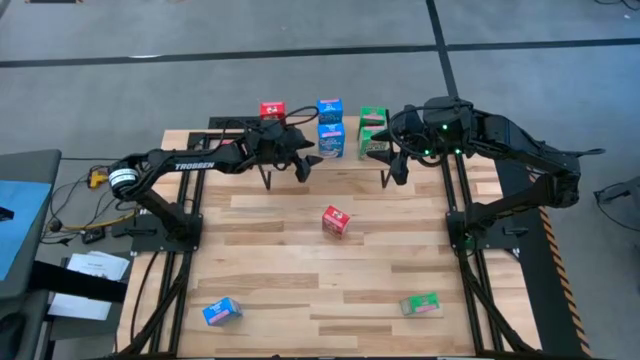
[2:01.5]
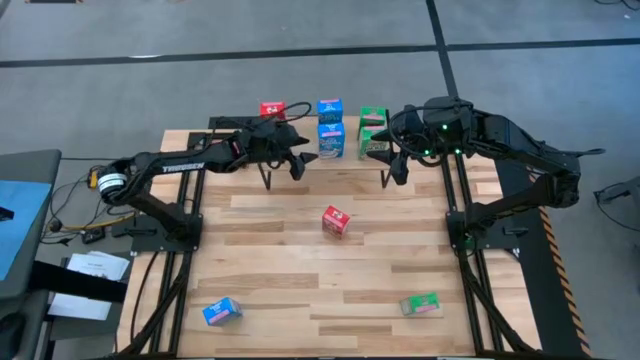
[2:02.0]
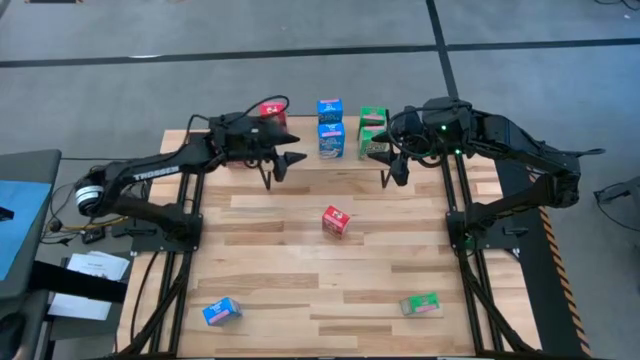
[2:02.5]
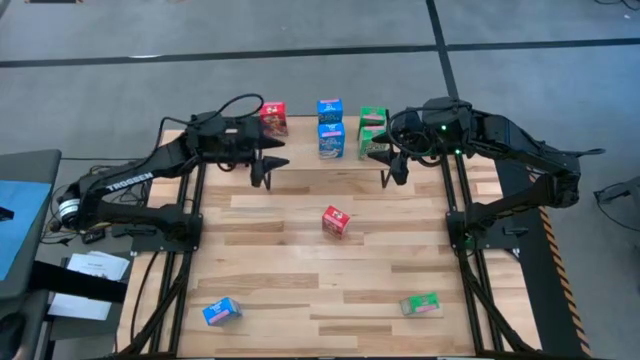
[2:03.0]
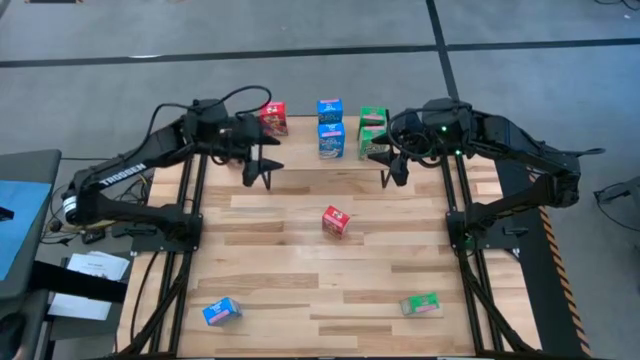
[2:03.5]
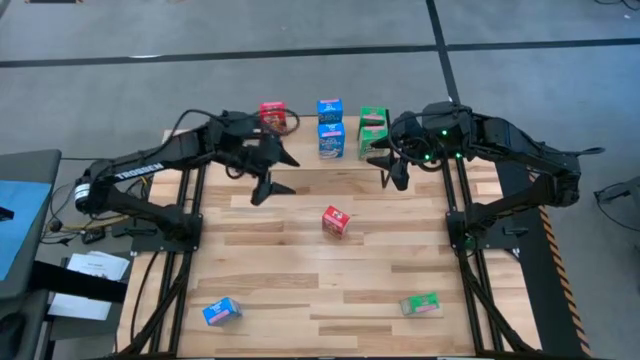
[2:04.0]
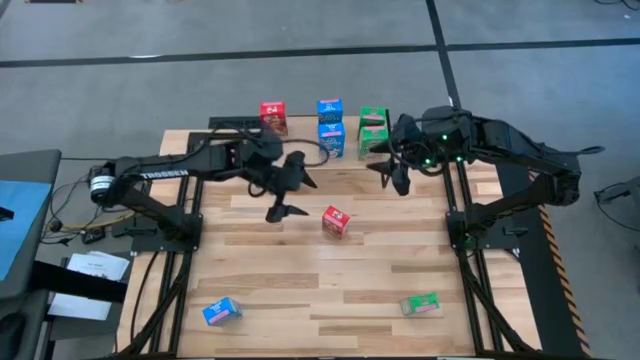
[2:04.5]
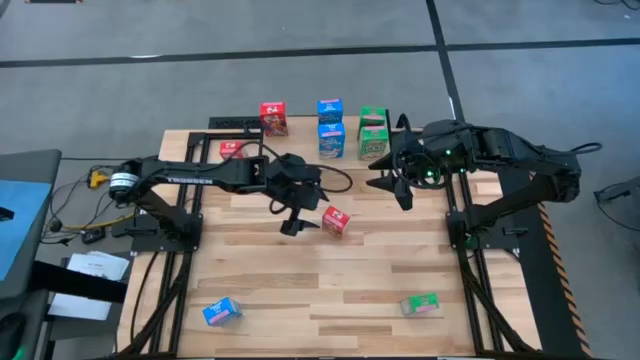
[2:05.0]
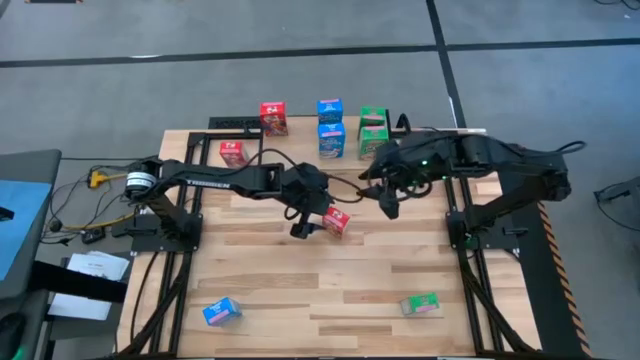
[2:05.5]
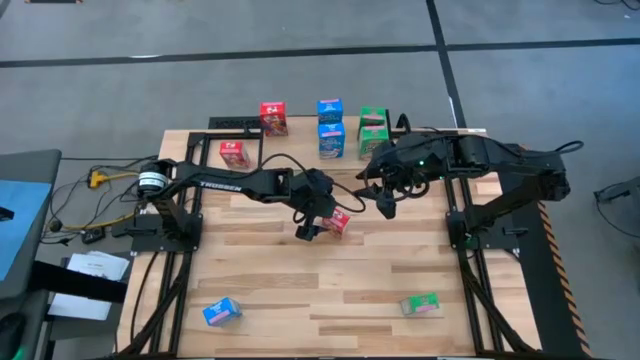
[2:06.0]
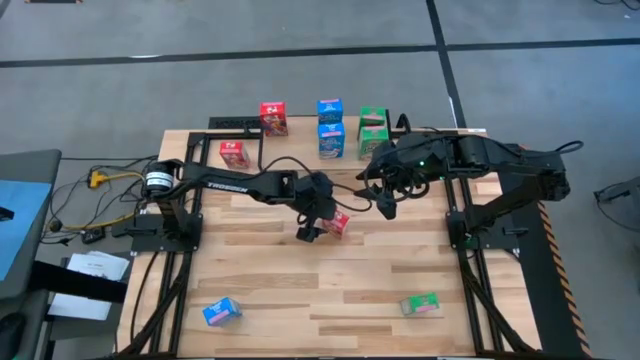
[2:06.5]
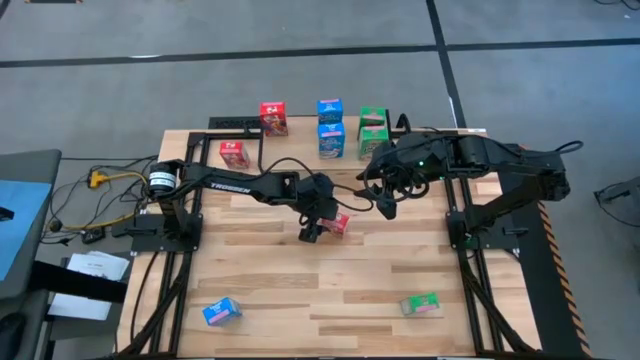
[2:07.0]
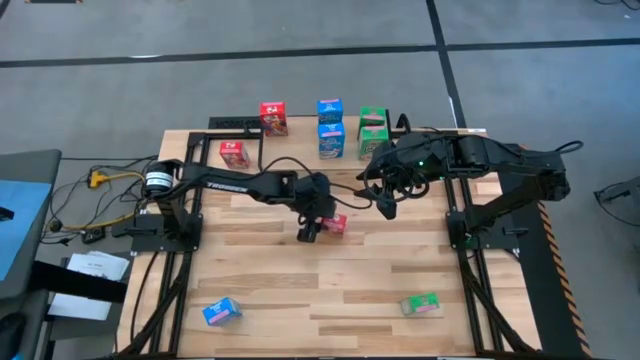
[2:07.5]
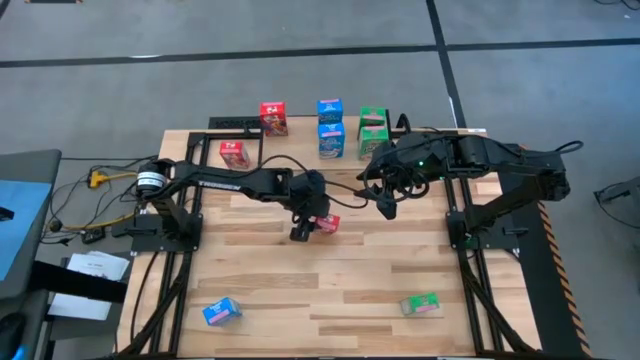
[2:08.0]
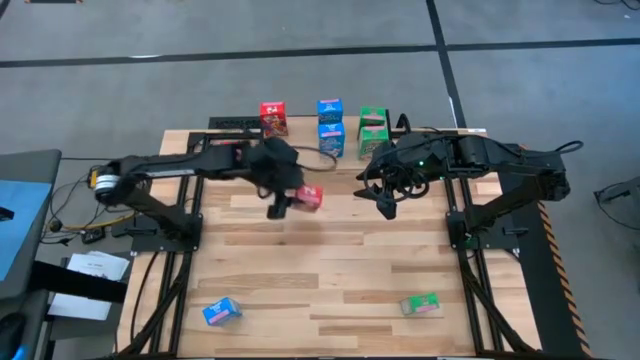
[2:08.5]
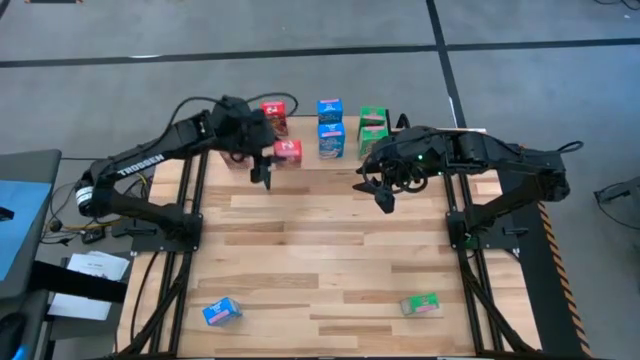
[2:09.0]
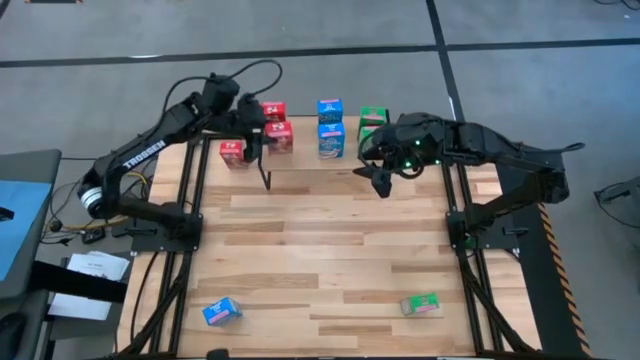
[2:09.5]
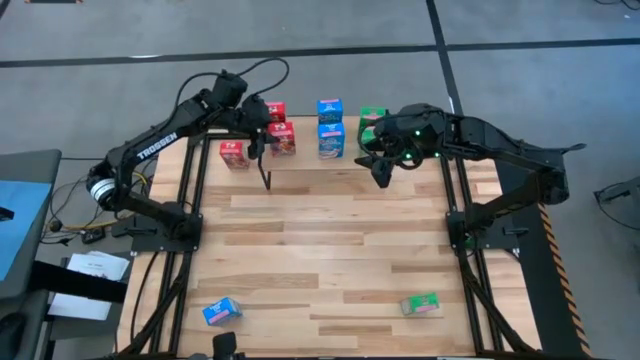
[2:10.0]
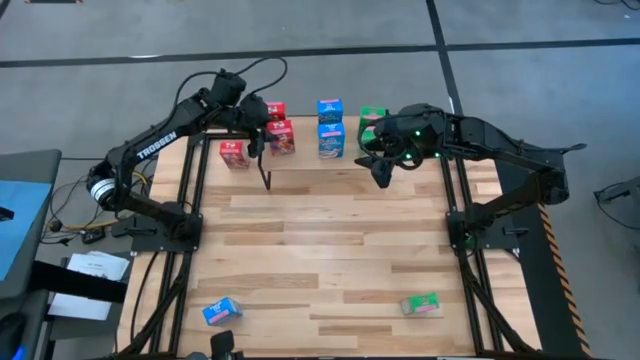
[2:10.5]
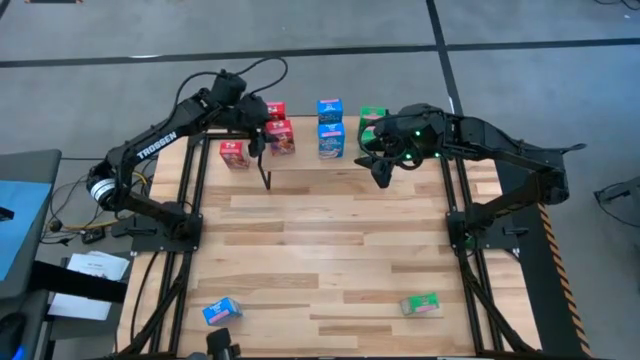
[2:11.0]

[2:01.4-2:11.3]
Task: Stack cereal on shelf
Put the bottom red cereal box on the shelf aligned with the other red cereal box

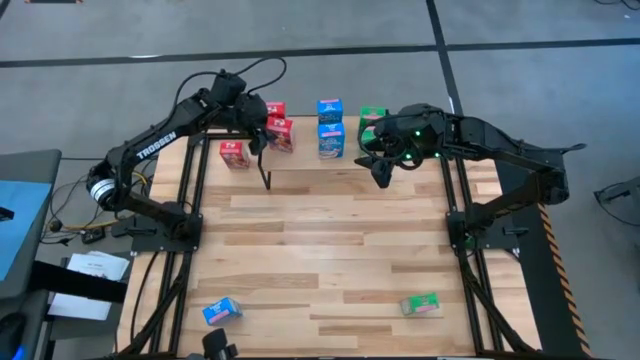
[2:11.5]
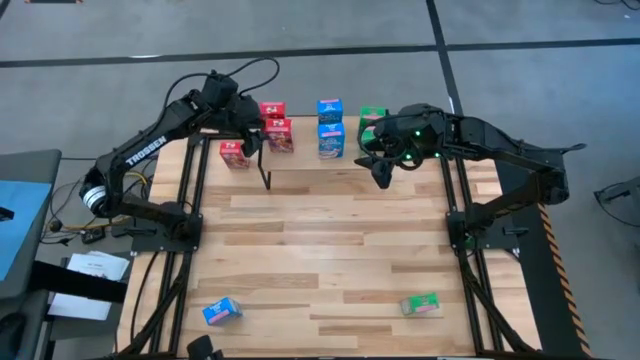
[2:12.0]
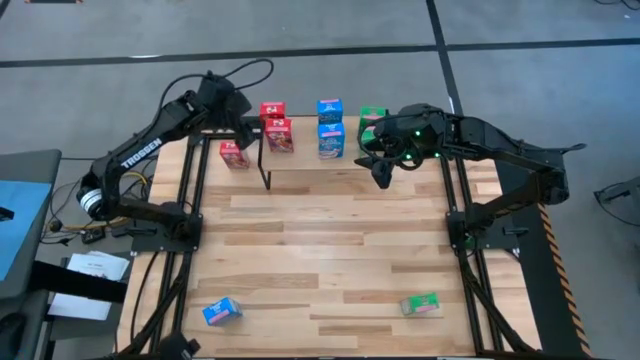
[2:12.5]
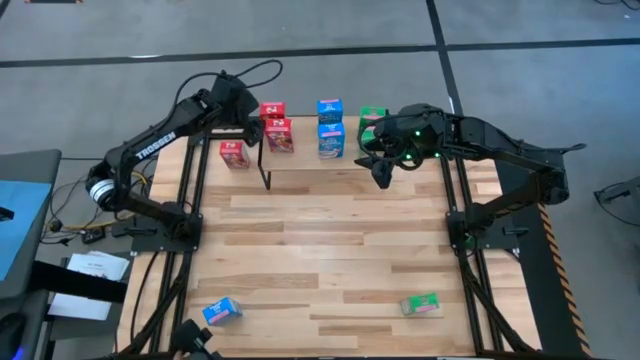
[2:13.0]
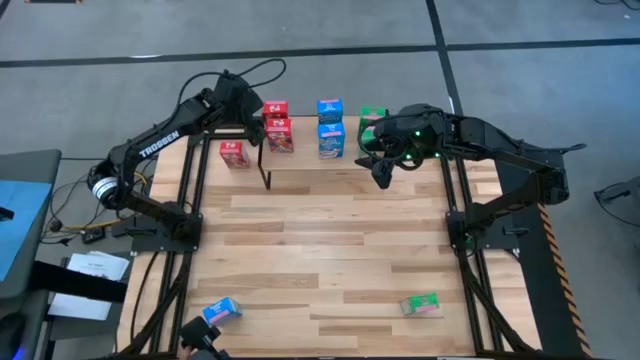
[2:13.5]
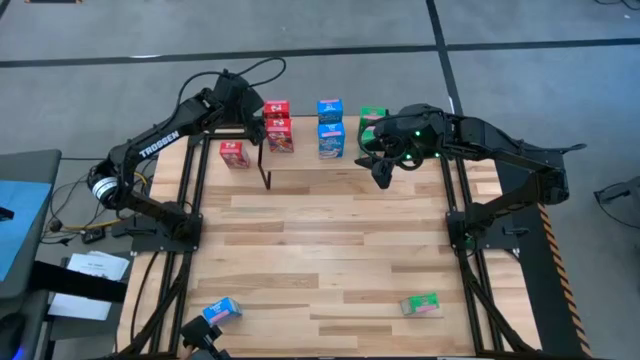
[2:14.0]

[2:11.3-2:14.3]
Adjust the red cereal box on the shelf

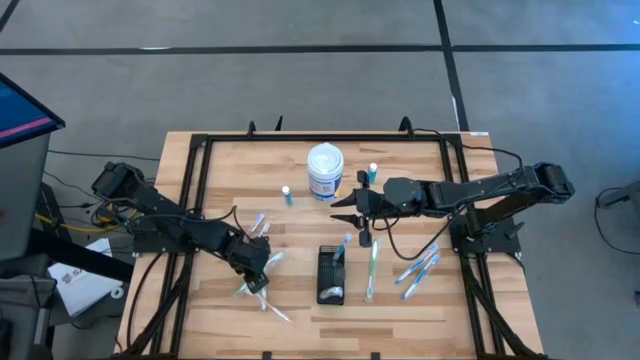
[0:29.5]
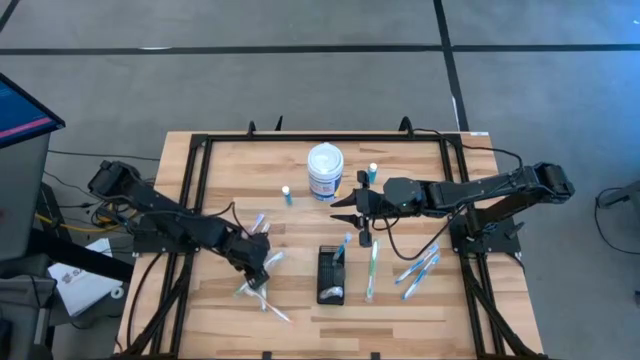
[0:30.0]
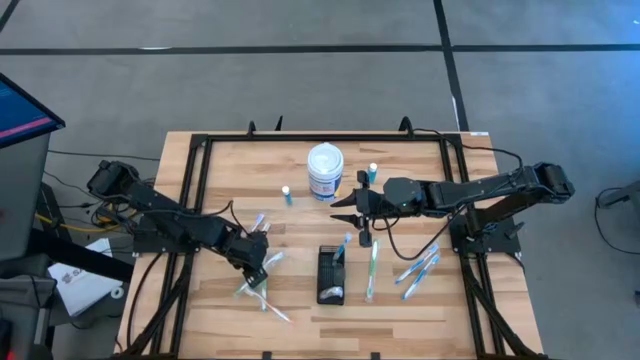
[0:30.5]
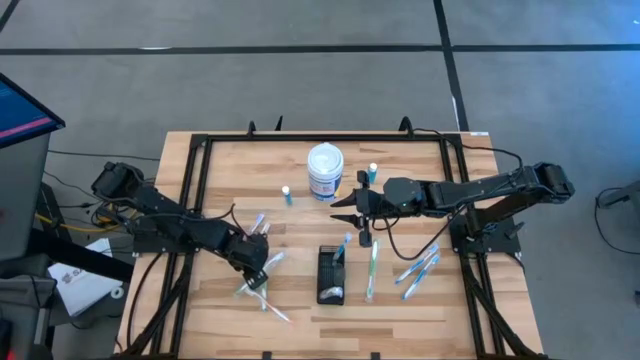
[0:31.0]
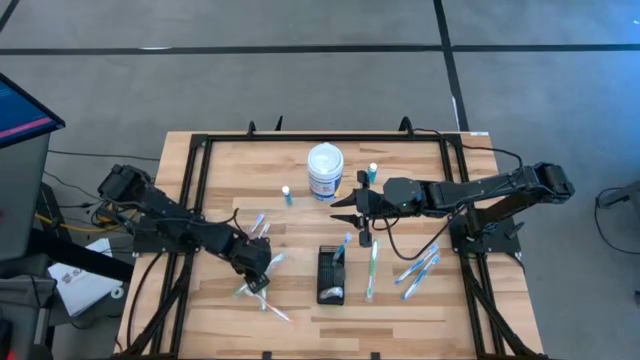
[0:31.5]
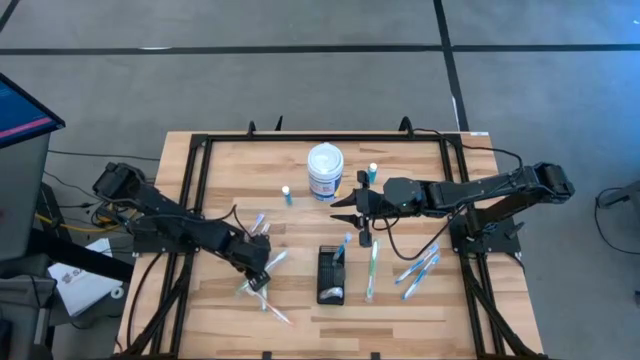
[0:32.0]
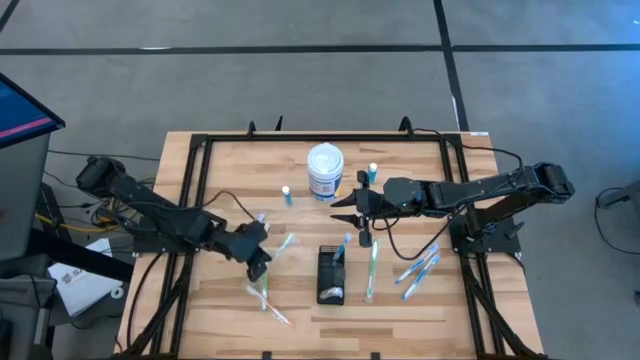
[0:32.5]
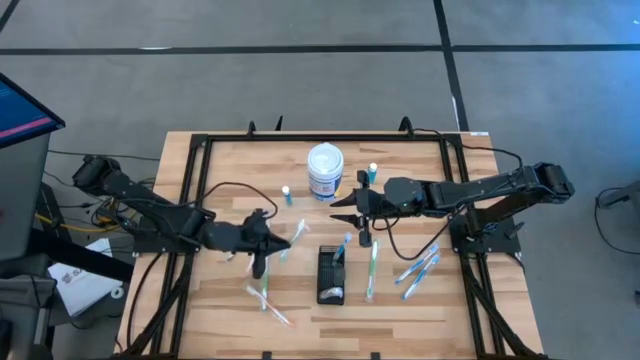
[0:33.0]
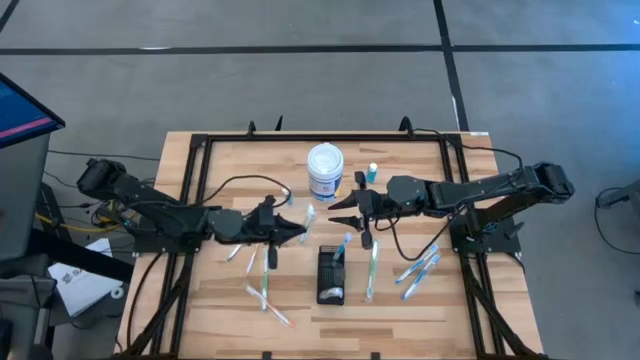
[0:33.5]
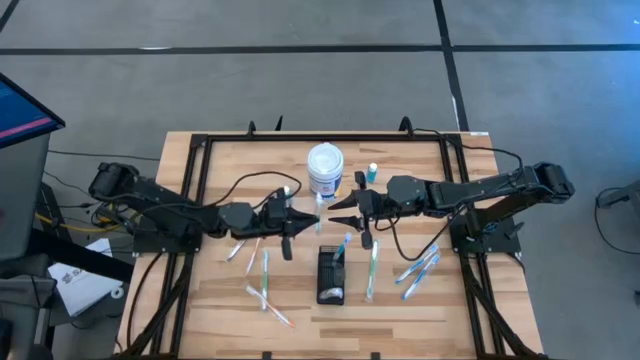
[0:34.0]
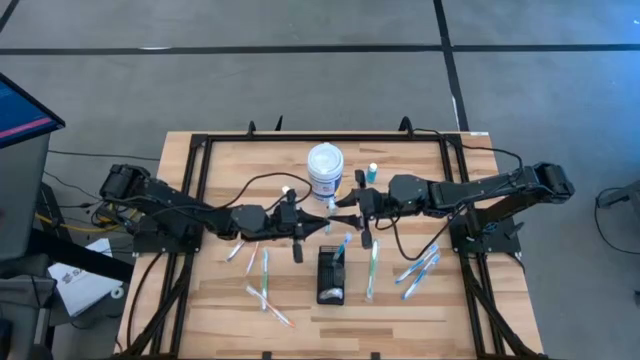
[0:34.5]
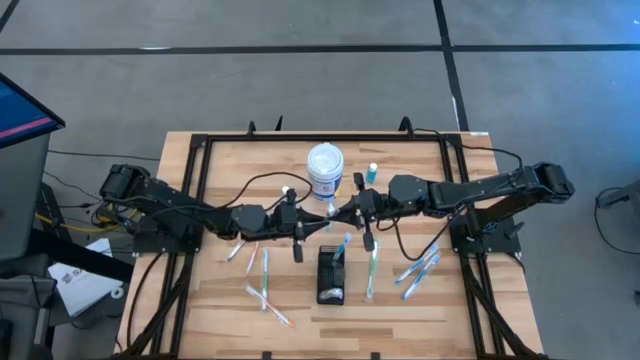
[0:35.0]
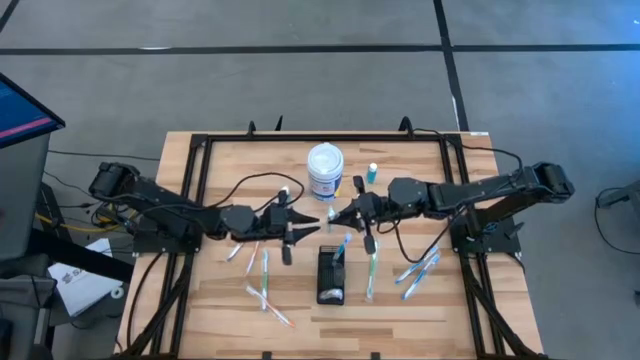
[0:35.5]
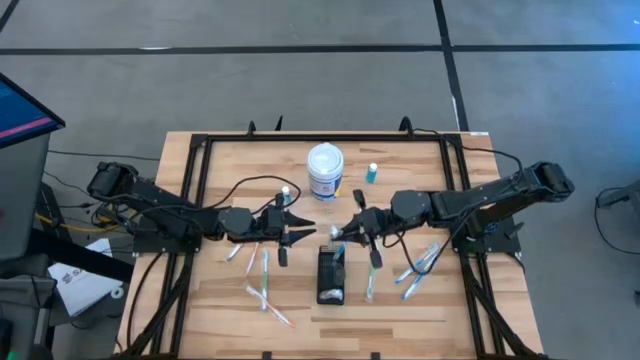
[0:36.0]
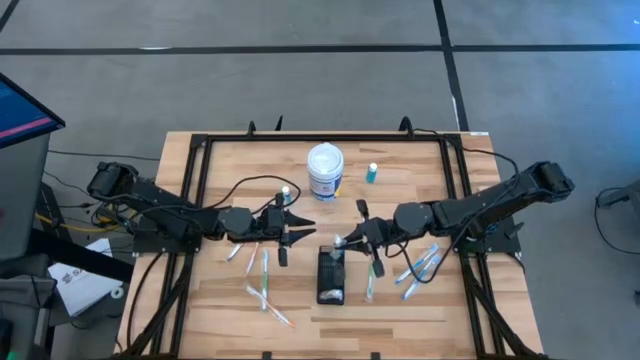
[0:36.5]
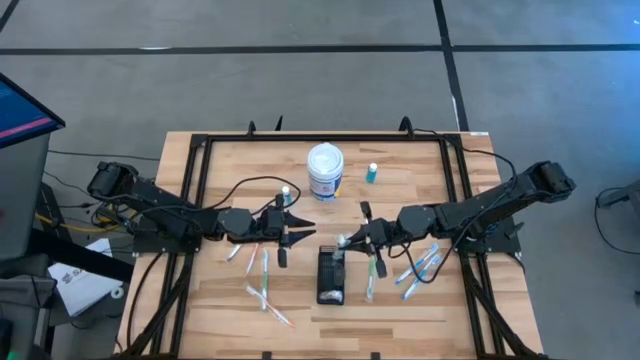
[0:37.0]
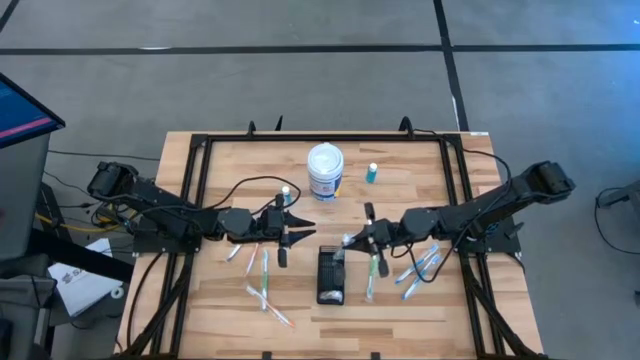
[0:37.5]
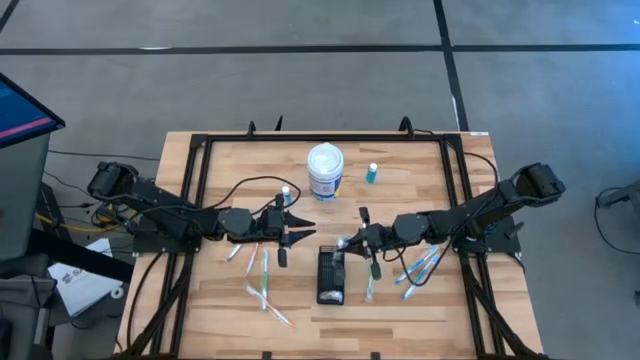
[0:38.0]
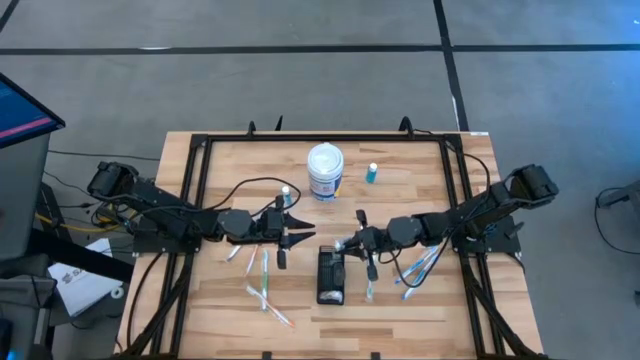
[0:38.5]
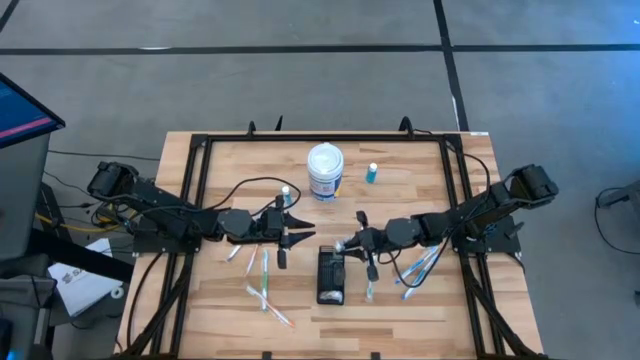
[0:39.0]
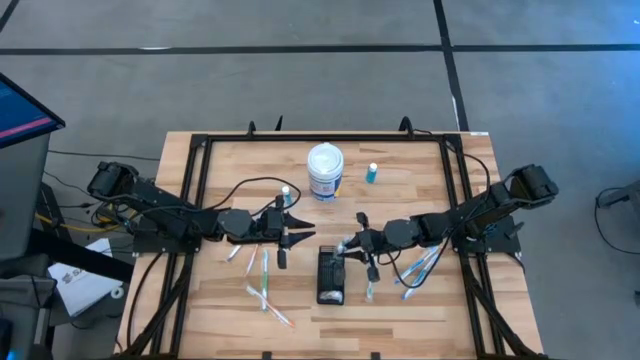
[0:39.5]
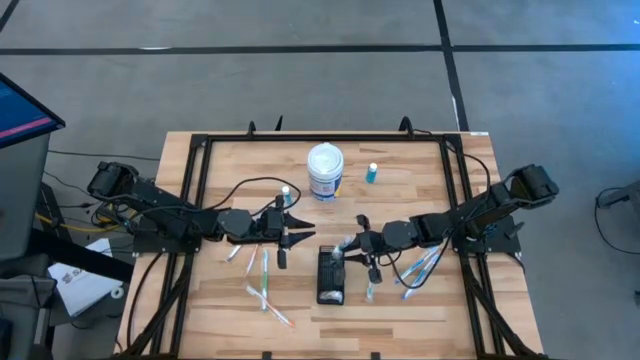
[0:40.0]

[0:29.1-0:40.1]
Task: Pick & Place toothbrushing station
Put the left green toothbrush into the black mesh organizer
